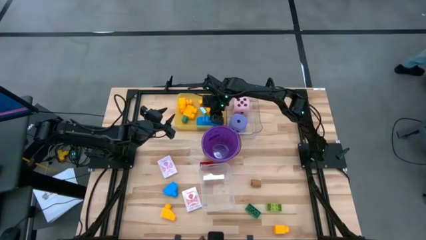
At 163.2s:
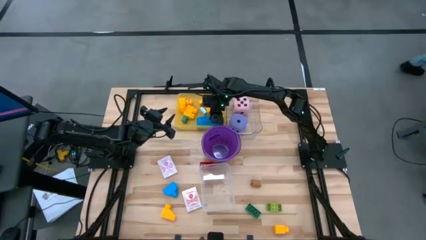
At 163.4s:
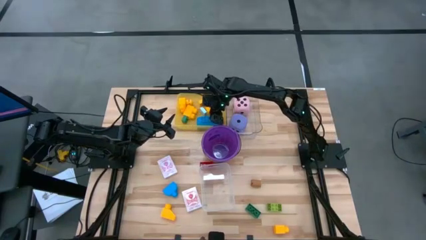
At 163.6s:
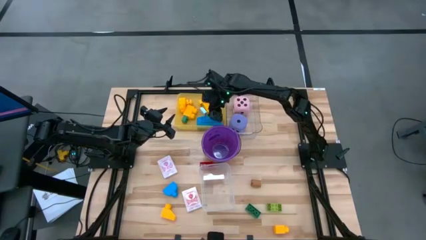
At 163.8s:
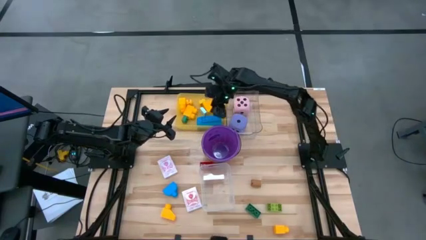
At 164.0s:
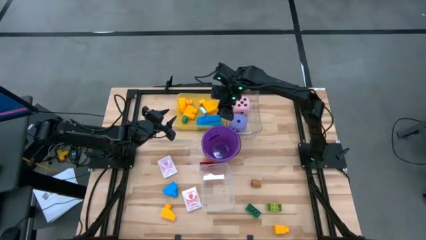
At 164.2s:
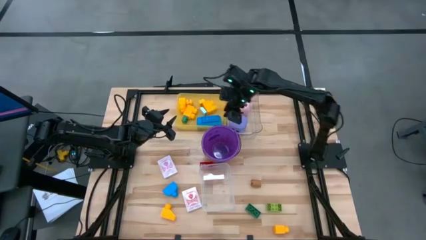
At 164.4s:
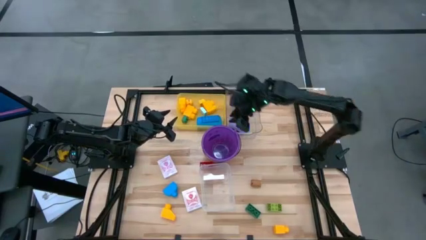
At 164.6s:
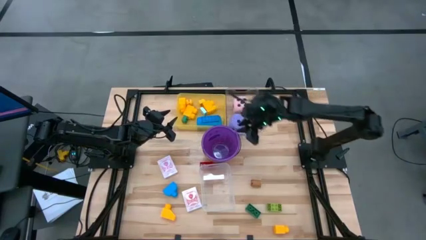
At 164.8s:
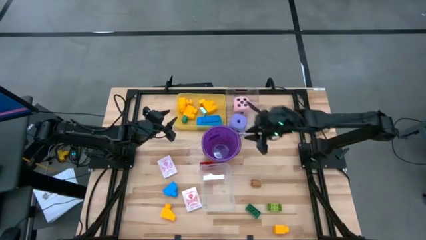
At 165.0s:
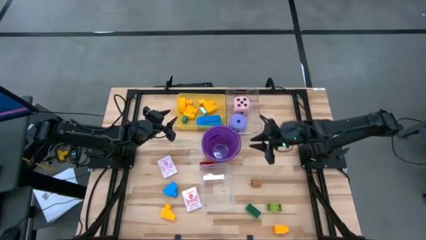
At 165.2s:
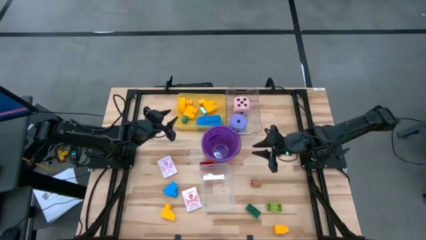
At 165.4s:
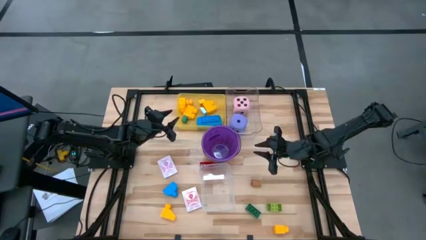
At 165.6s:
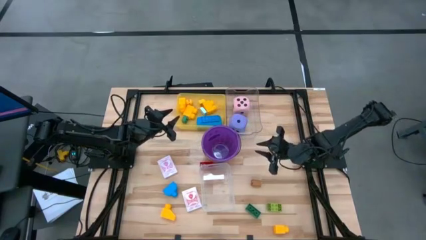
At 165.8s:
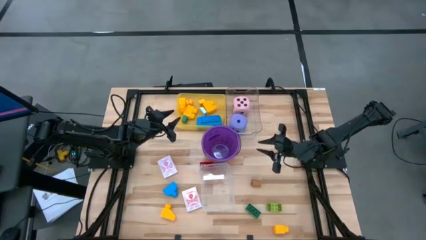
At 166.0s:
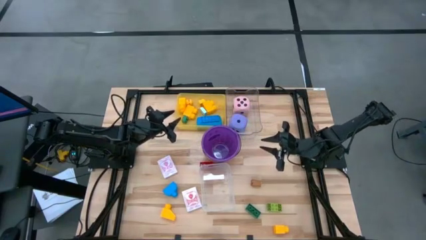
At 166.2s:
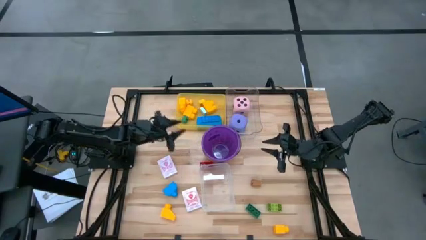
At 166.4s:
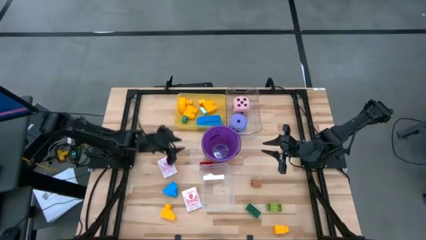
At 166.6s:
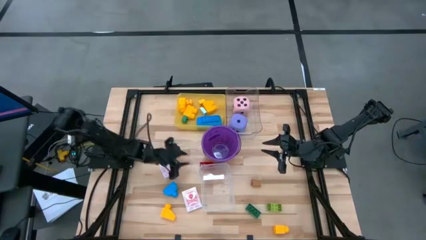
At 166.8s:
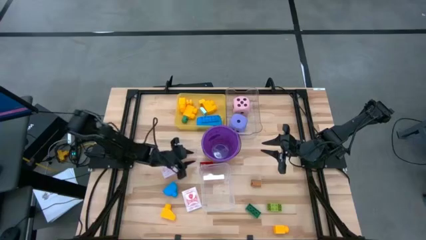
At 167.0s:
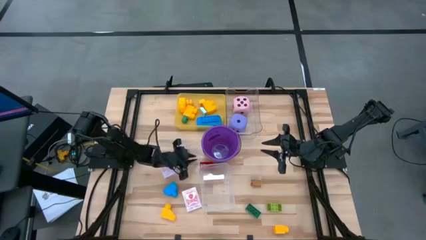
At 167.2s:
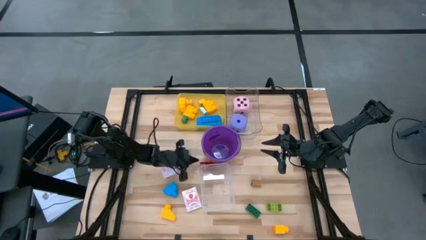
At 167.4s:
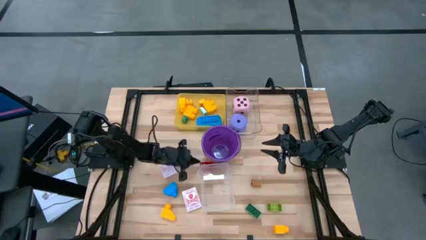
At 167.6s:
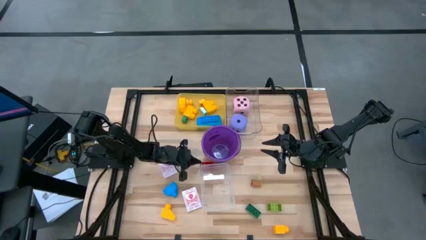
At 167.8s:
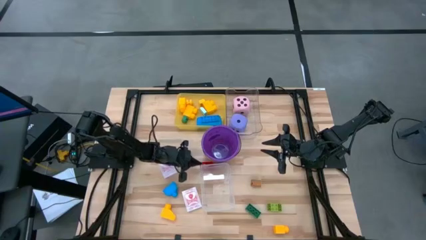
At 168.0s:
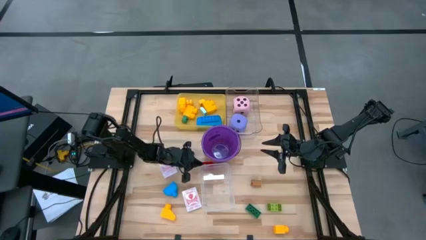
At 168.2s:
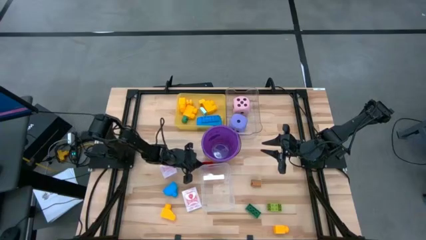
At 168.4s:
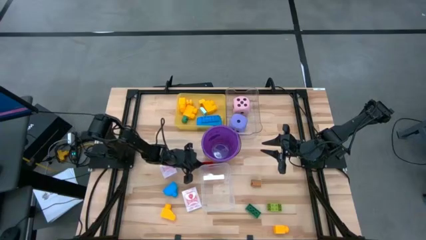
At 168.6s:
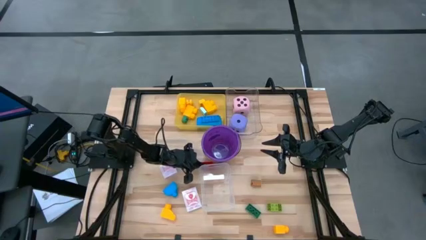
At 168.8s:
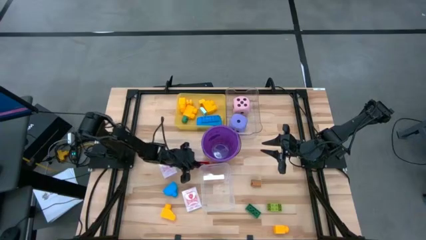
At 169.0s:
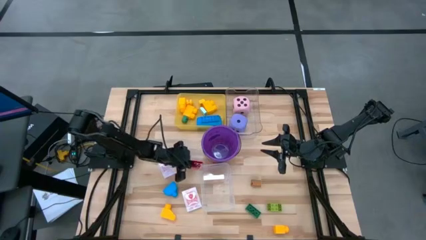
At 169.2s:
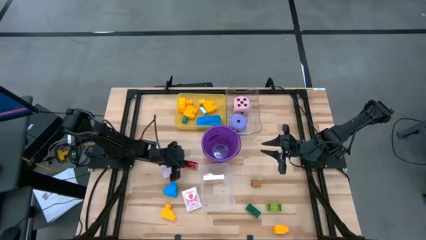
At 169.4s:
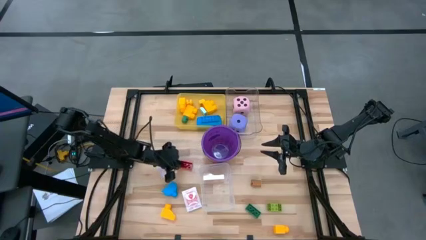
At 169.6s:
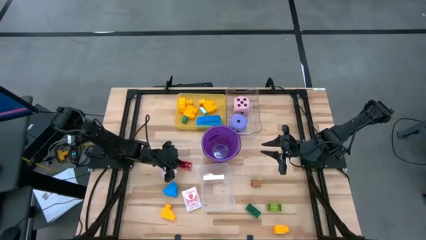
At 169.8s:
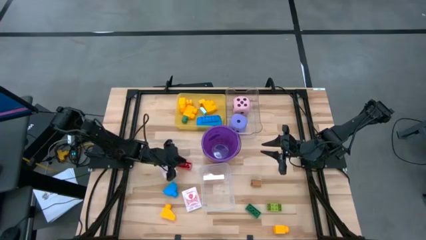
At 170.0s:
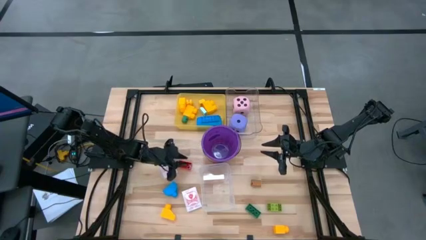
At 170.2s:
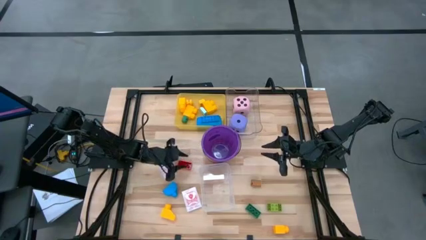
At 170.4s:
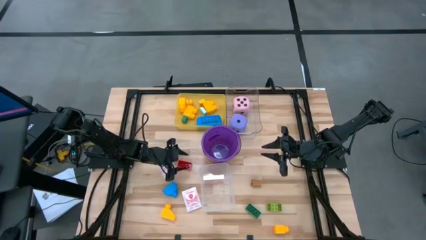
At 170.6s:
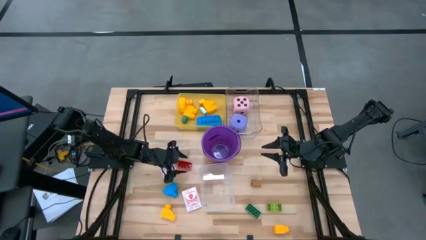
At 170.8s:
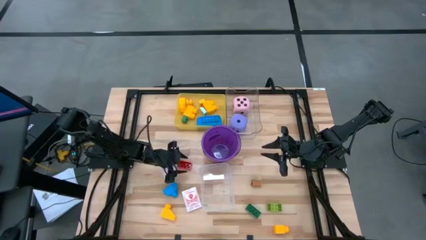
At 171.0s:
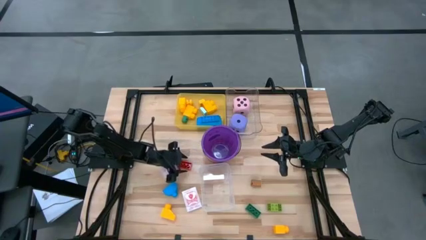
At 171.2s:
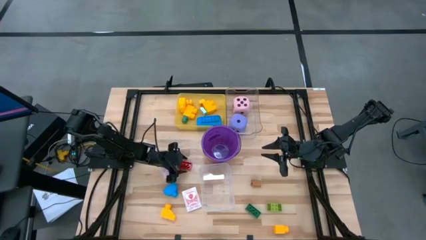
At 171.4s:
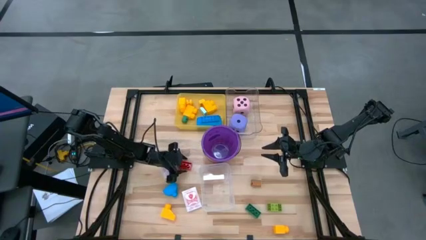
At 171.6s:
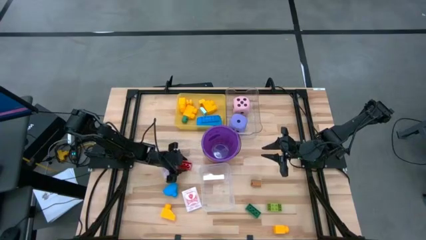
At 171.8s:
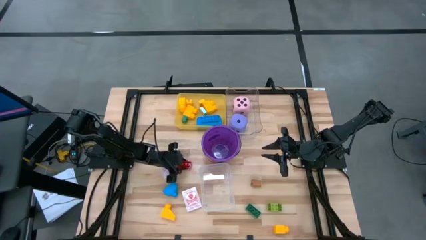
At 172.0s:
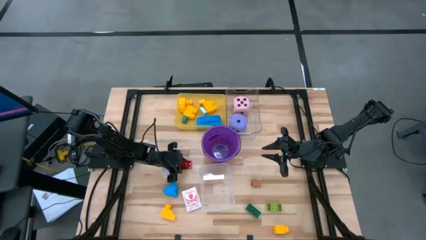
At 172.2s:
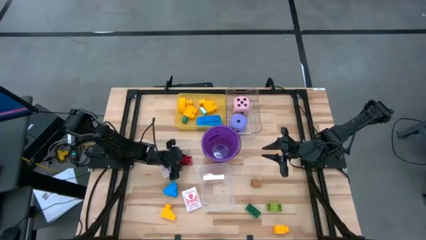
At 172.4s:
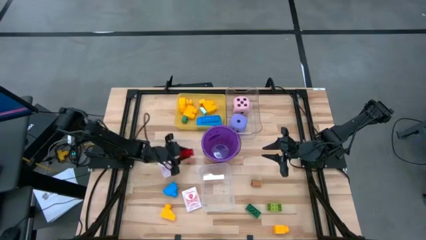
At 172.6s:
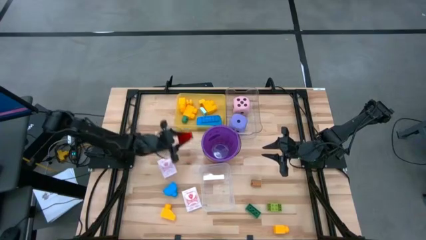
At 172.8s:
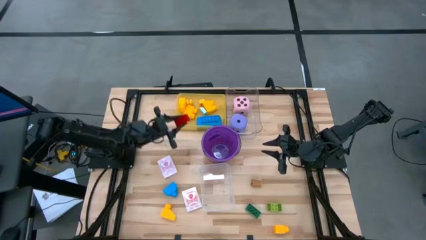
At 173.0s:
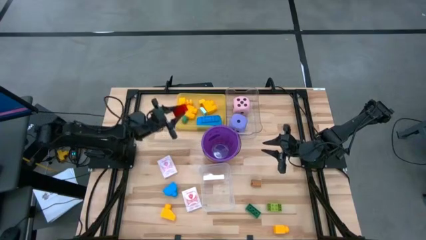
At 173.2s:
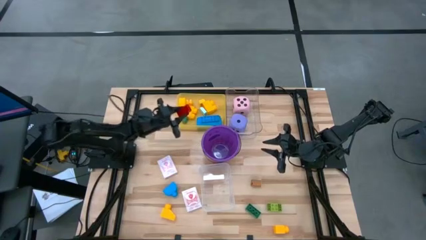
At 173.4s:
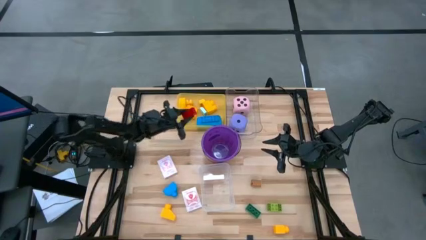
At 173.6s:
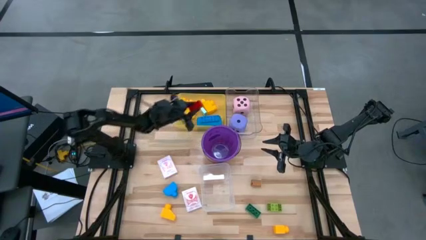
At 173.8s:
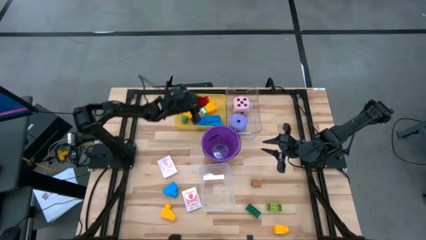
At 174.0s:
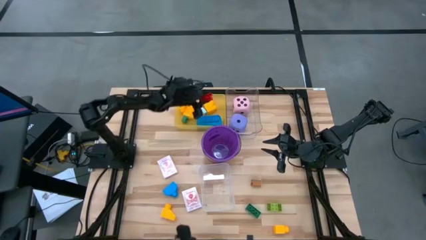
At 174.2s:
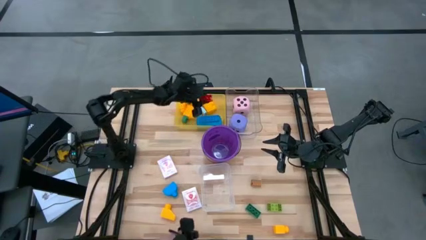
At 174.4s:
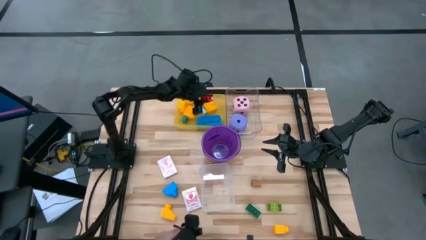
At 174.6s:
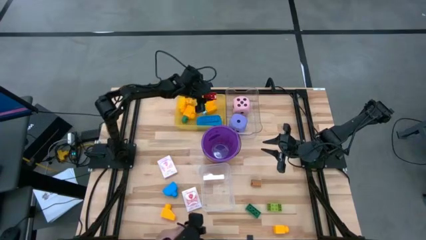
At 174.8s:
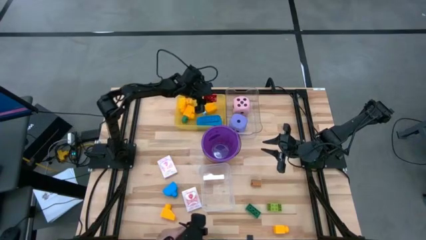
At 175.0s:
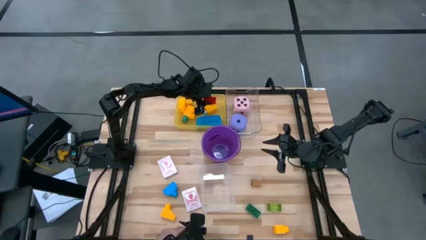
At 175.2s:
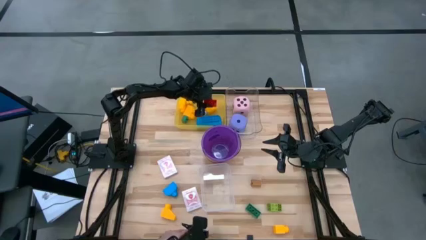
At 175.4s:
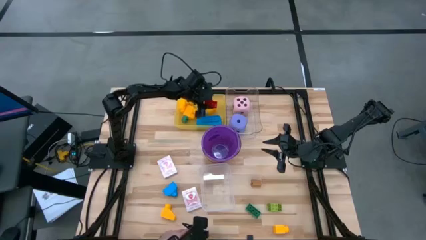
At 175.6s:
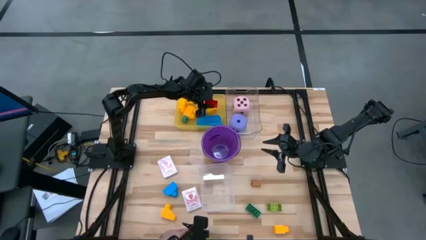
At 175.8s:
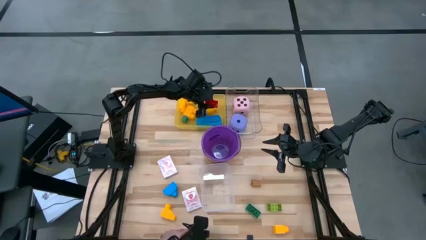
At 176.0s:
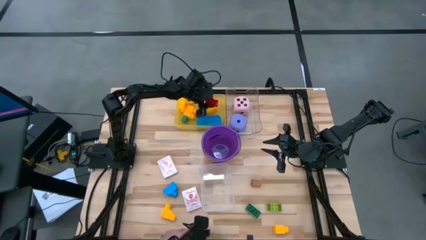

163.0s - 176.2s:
Task: Pick & Place Toys
Put the red game piece into the yellow bin

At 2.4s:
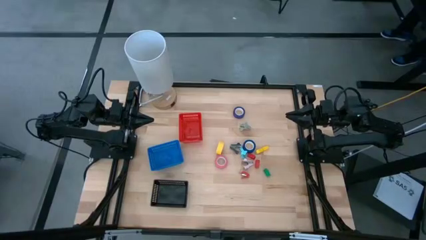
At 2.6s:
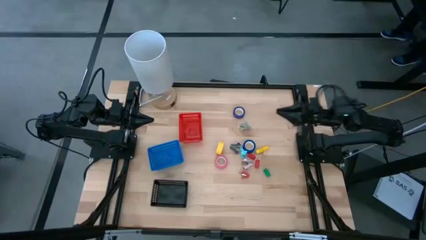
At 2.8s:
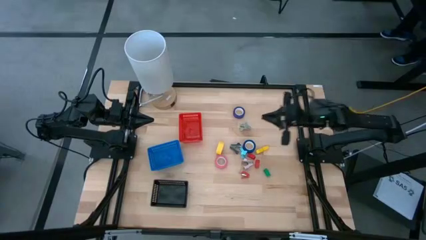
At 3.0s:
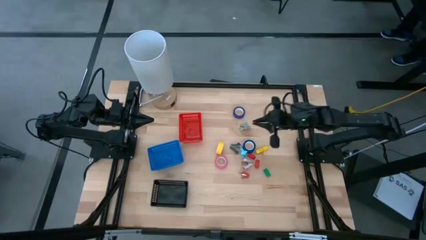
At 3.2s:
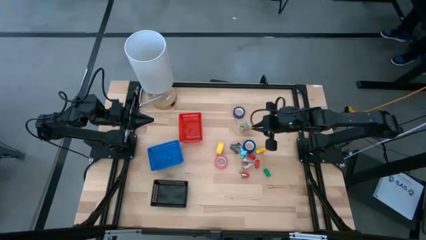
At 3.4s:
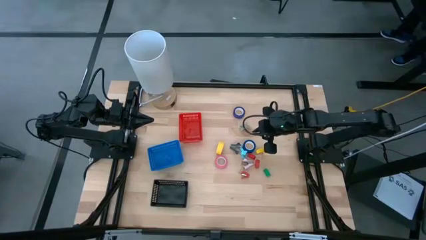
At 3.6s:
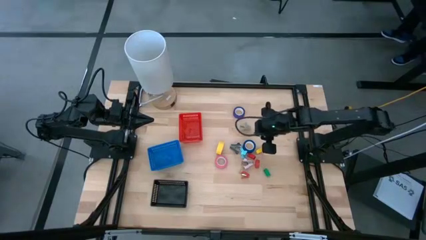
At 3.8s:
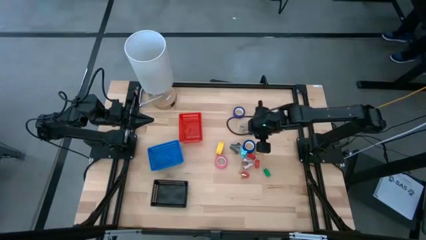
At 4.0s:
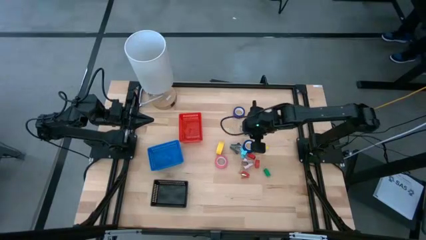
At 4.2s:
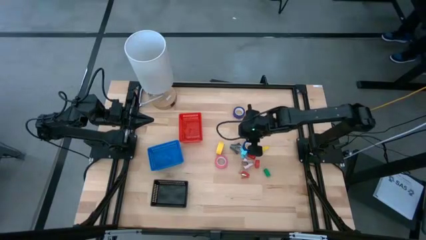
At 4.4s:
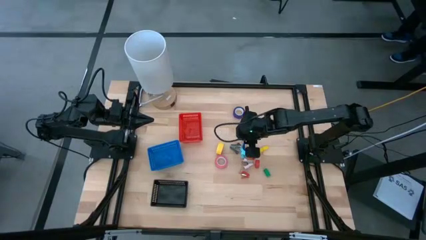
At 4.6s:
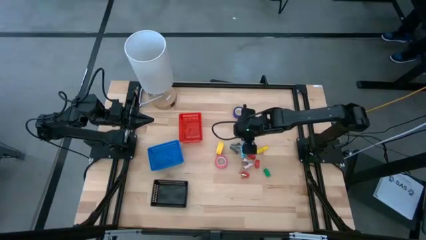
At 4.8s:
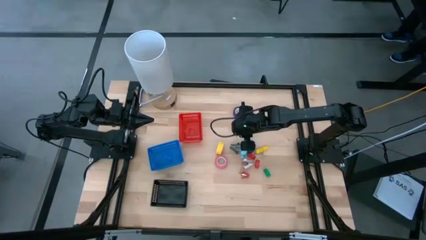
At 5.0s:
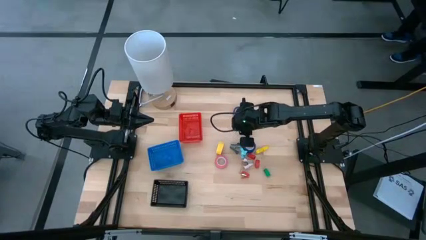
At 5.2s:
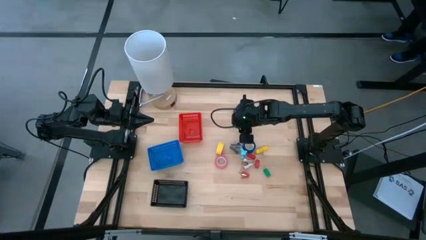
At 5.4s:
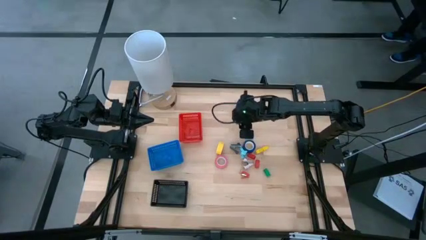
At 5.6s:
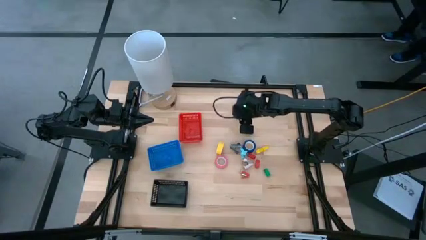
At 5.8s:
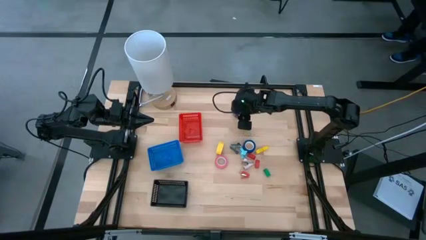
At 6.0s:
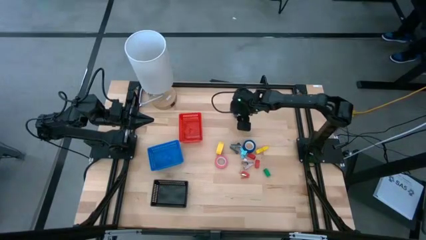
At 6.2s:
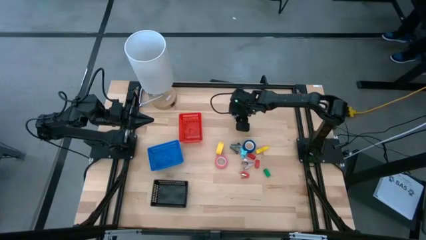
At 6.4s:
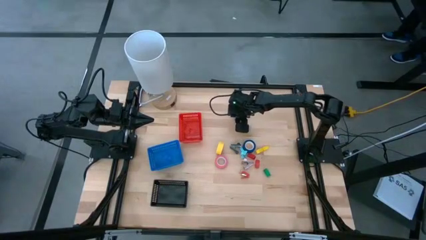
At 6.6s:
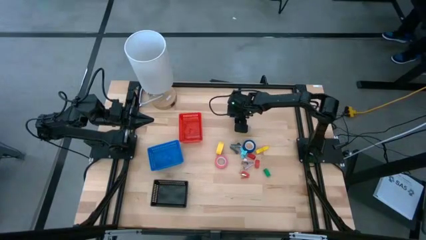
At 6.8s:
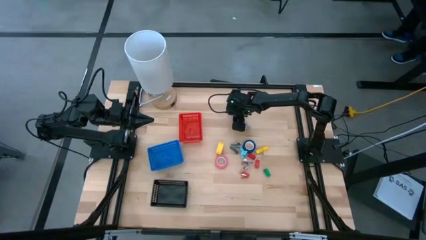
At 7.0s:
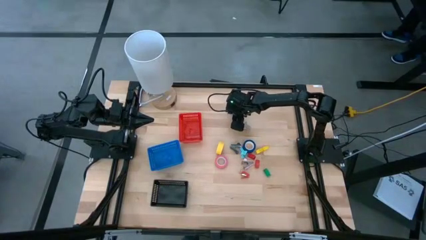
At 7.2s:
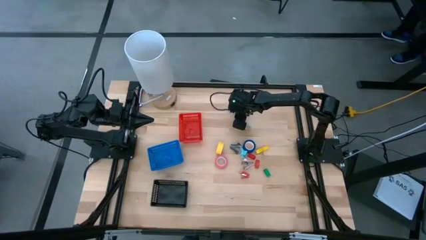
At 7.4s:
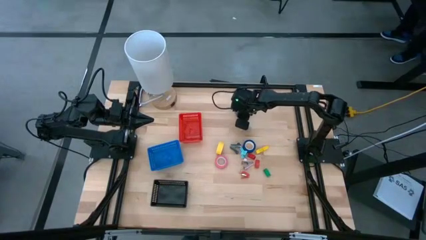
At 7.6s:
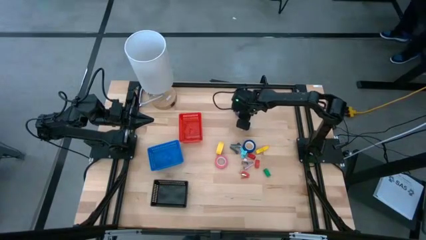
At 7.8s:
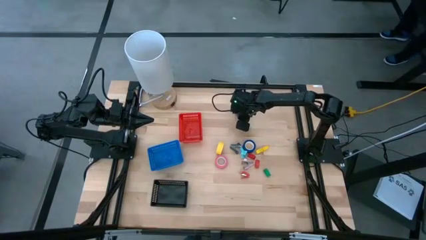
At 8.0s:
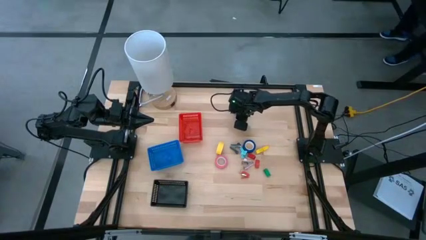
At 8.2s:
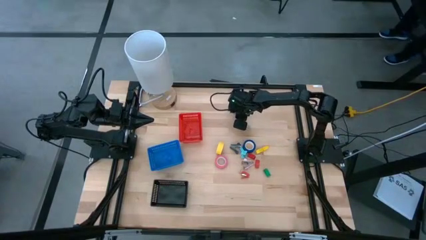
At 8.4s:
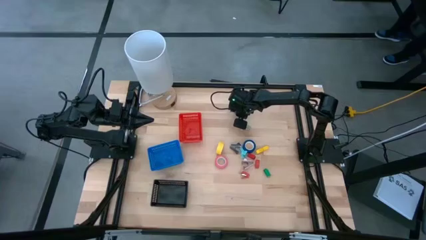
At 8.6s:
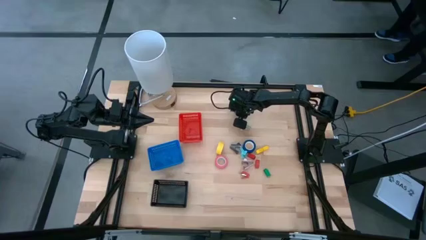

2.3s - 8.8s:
Task: Pick and place Stapler, Stapler remover, tape
Put the top blue tape into the red basket
